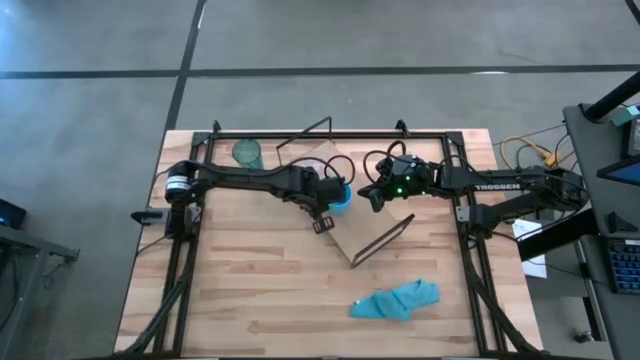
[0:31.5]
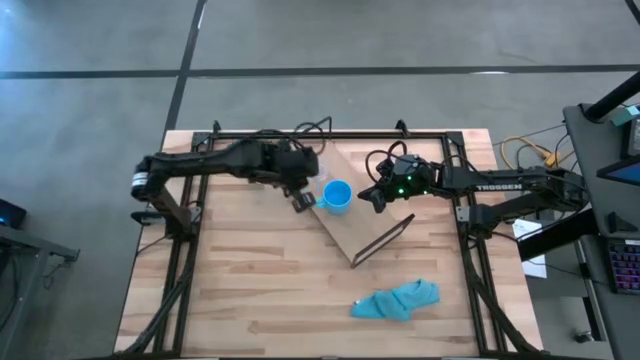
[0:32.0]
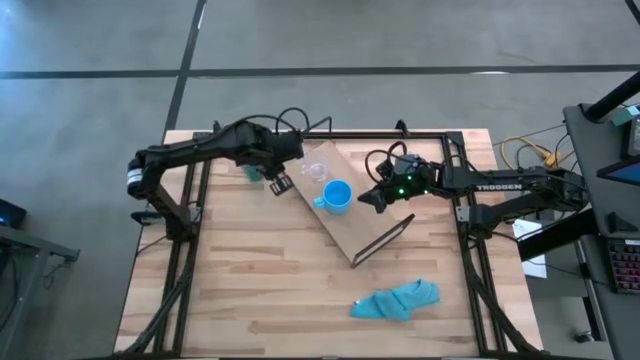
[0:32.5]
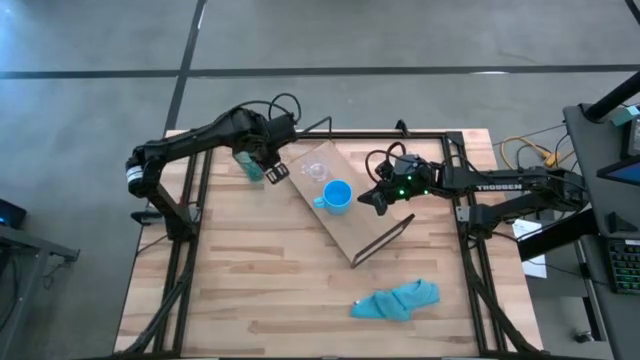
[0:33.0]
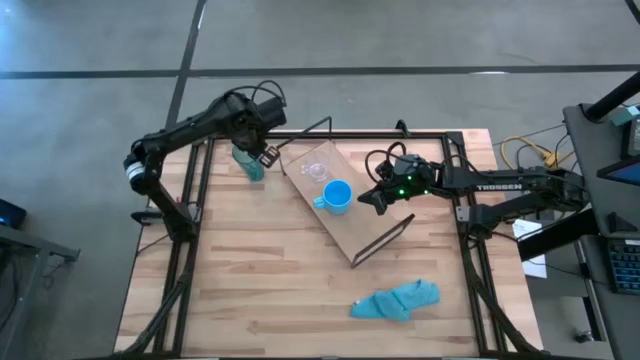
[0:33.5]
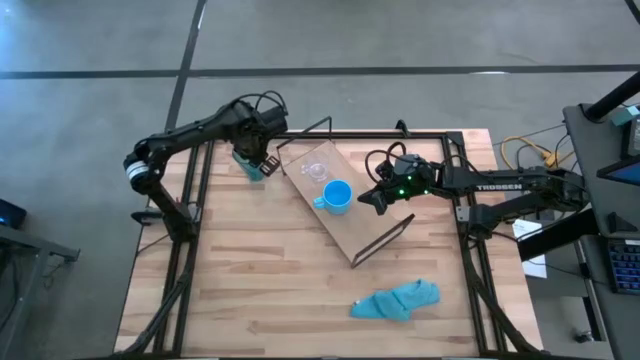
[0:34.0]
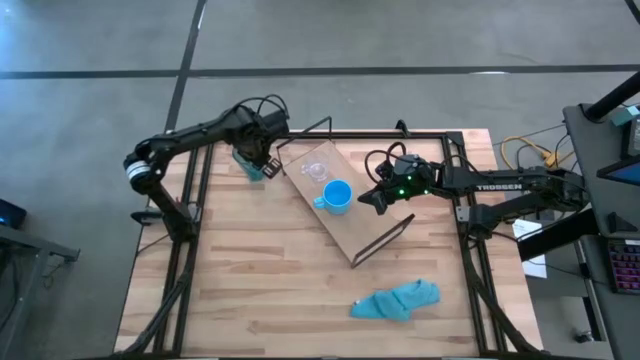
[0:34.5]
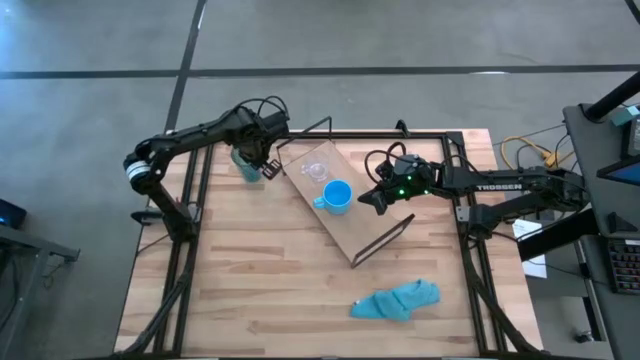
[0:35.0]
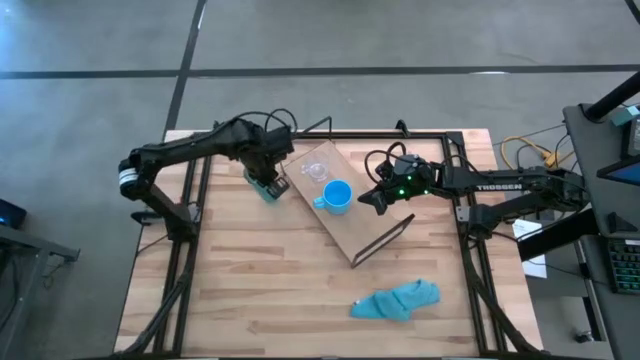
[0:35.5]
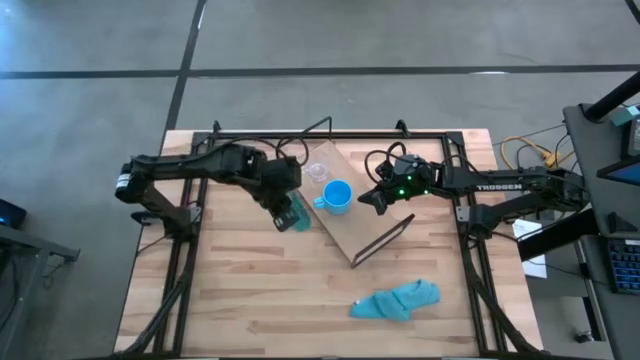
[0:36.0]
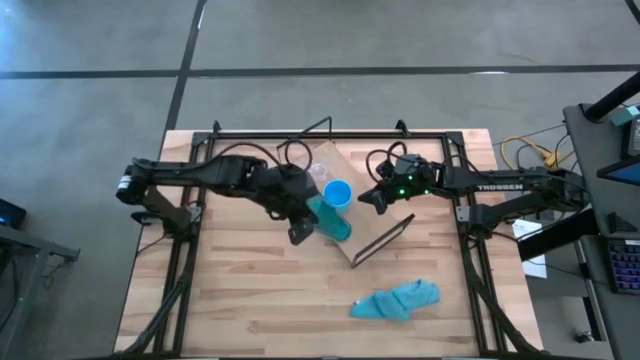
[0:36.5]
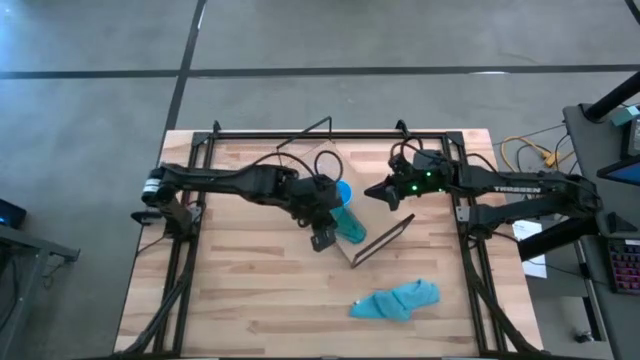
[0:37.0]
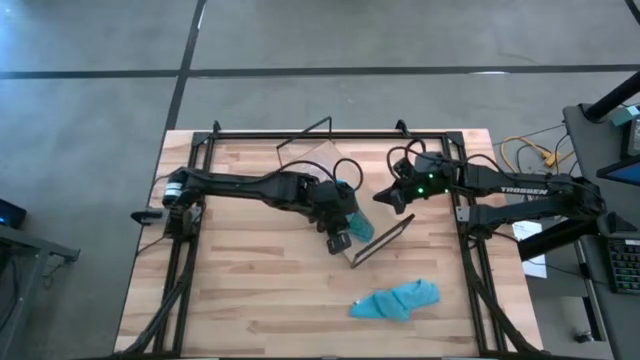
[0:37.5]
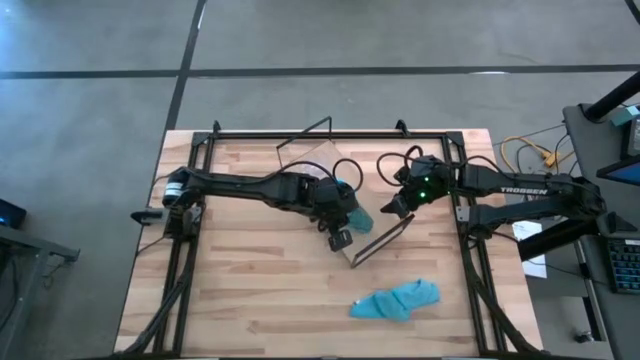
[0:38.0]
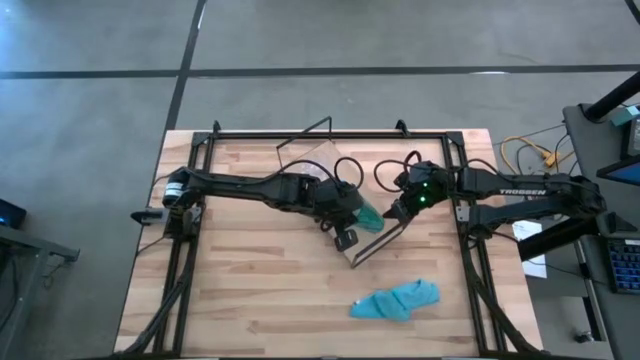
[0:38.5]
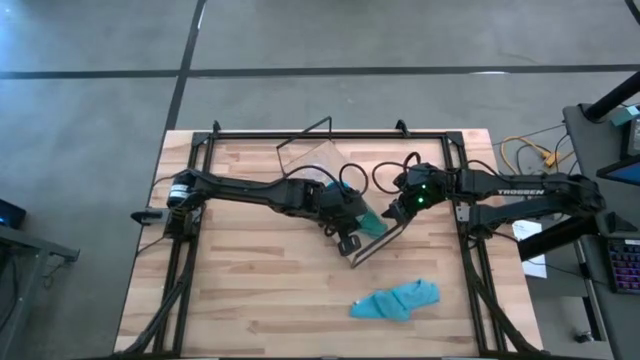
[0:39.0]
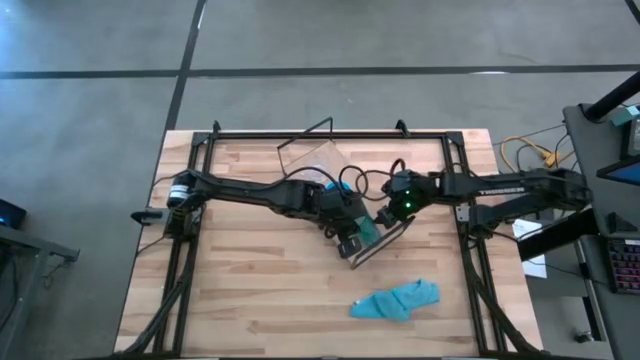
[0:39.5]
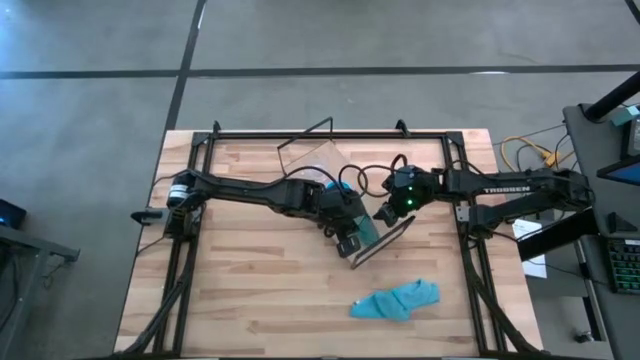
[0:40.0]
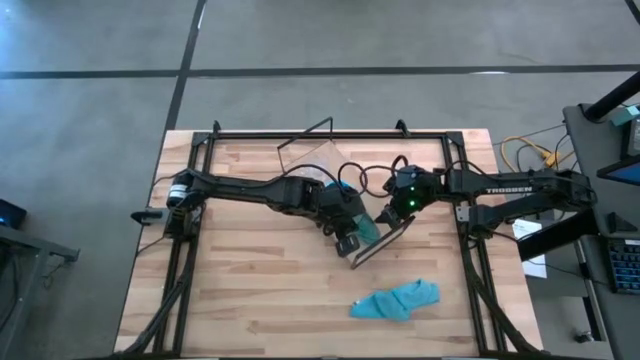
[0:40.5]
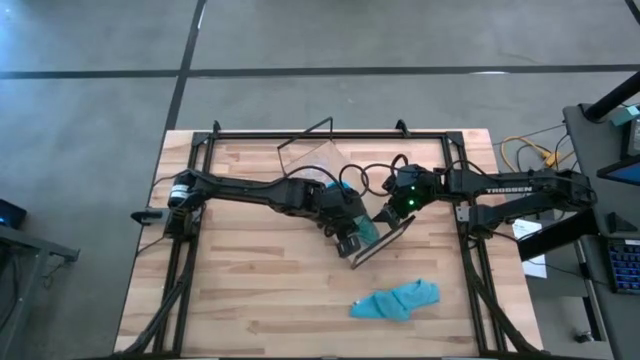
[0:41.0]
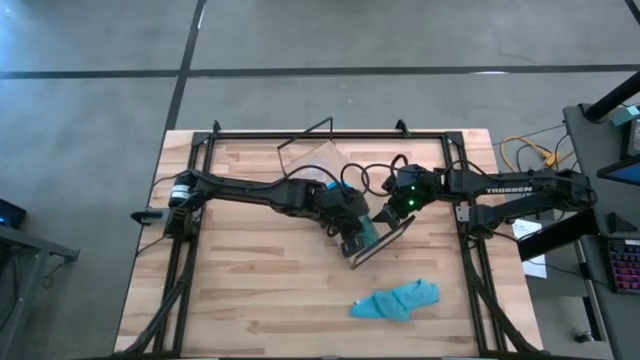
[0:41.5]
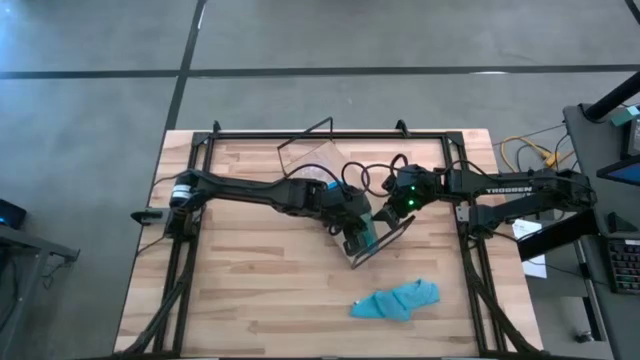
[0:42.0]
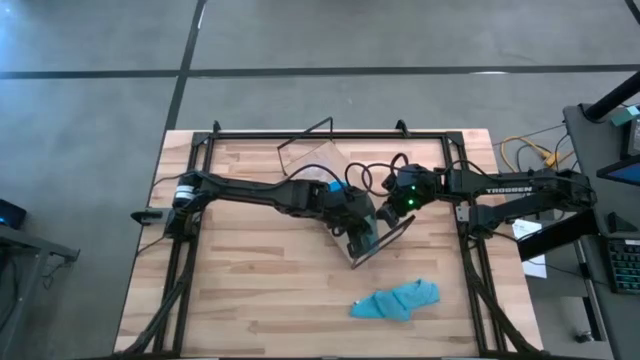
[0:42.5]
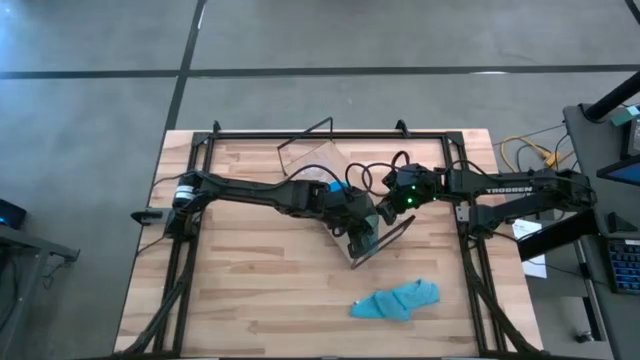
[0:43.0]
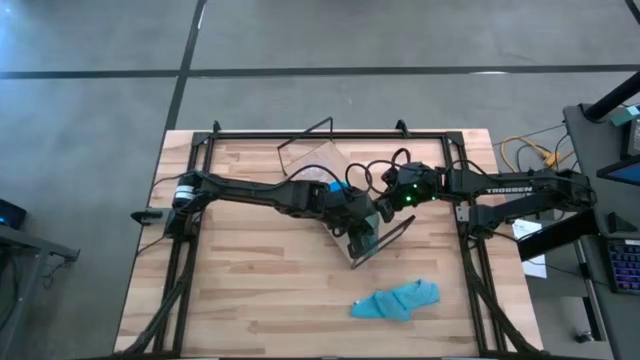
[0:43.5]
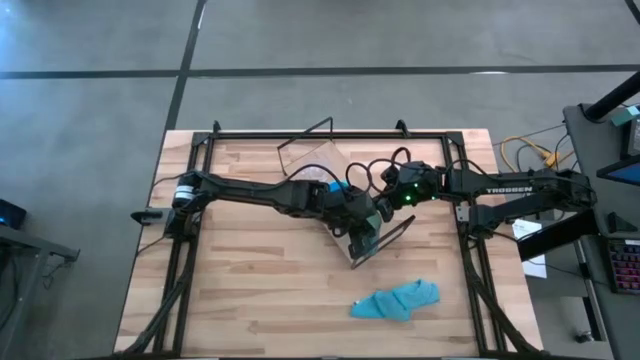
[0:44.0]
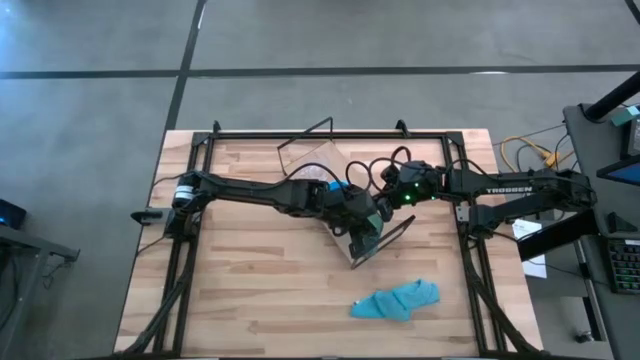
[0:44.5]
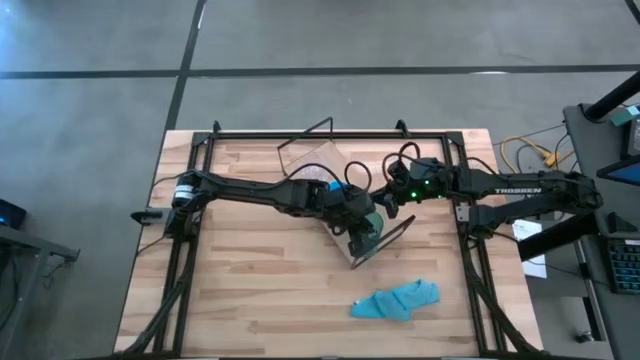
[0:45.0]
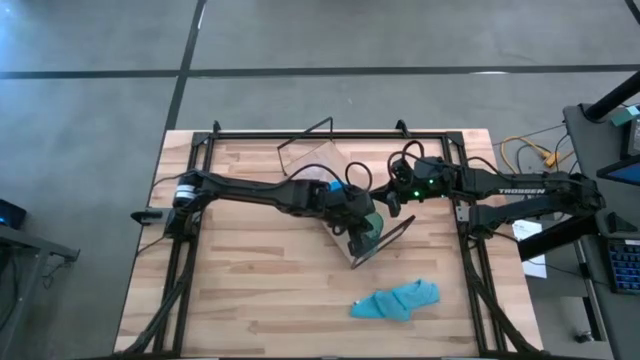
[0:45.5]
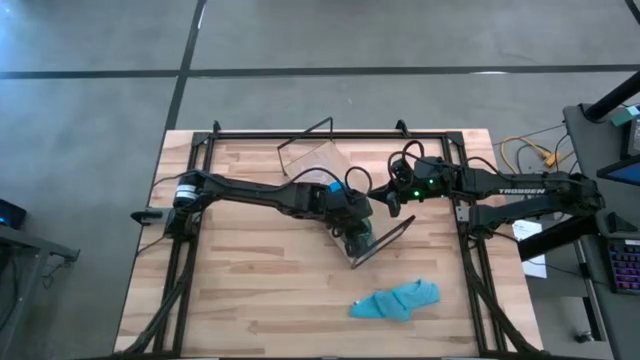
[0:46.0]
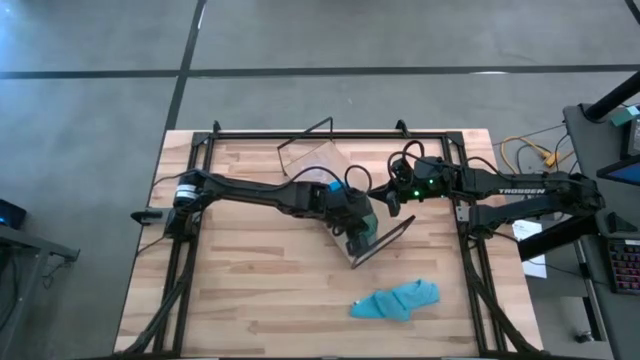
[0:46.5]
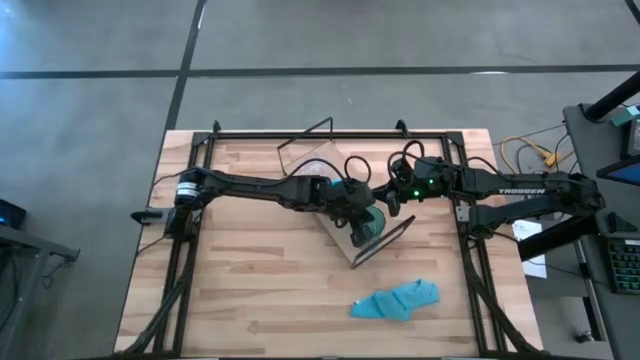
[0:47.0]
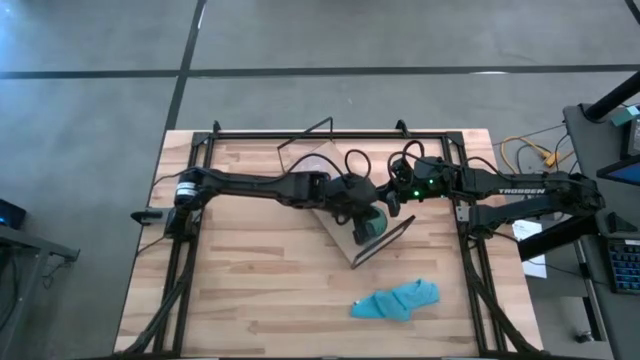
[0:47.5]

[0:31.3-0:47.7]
Task: Stack small to large cups/mugs on shelf
Put the blue cup on the shelf

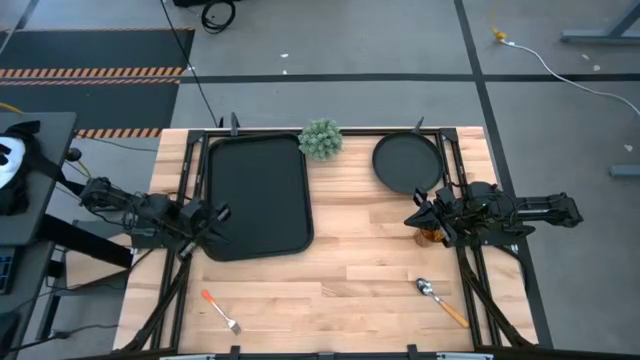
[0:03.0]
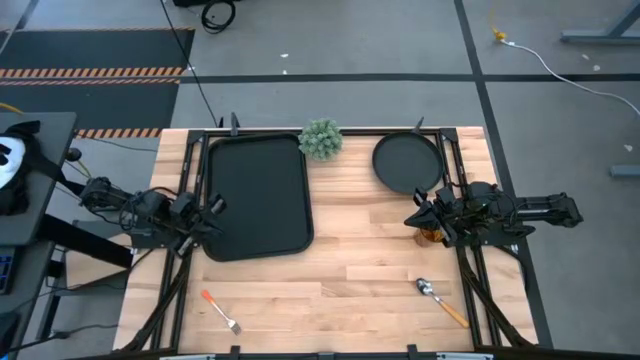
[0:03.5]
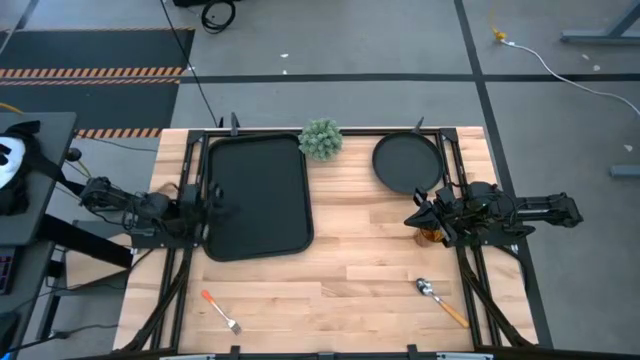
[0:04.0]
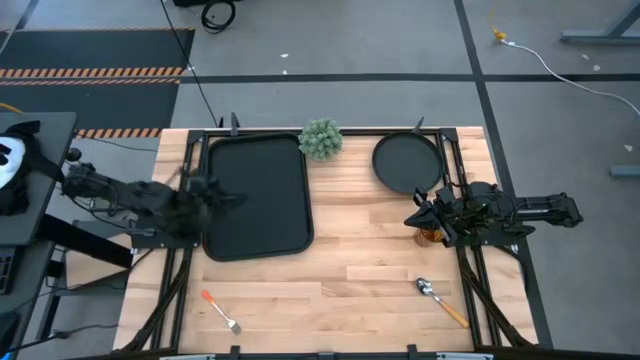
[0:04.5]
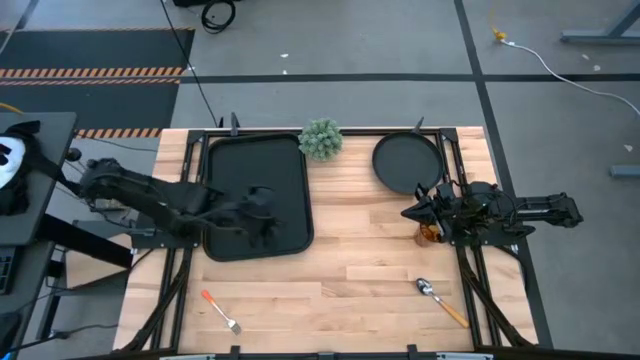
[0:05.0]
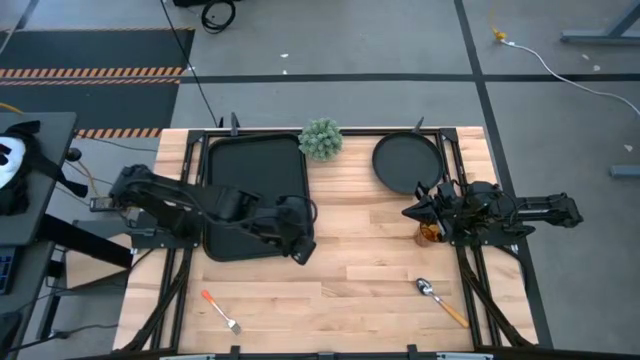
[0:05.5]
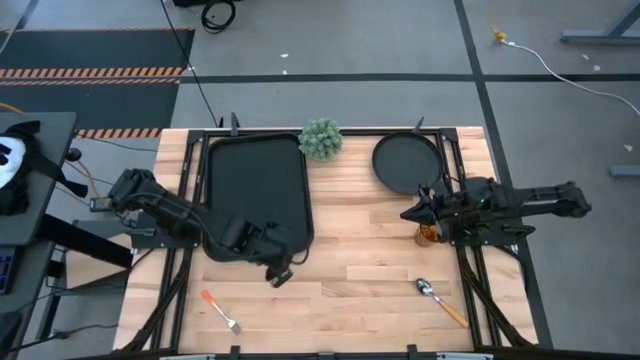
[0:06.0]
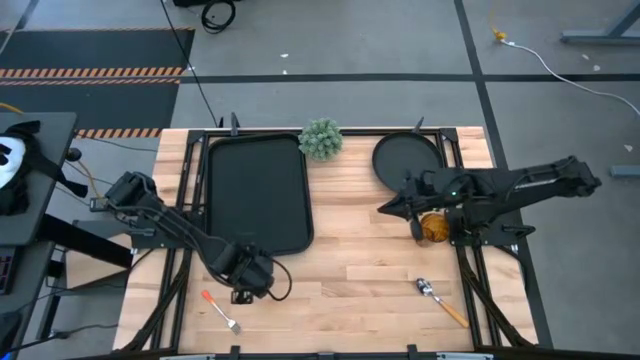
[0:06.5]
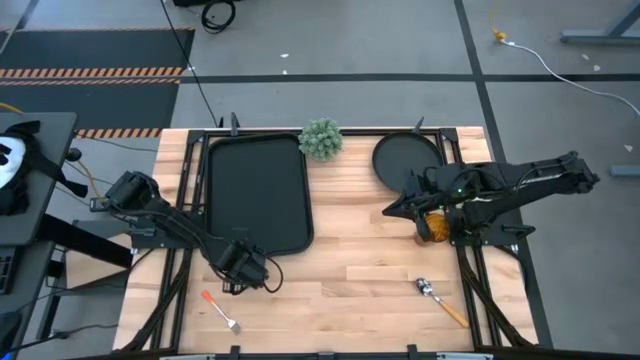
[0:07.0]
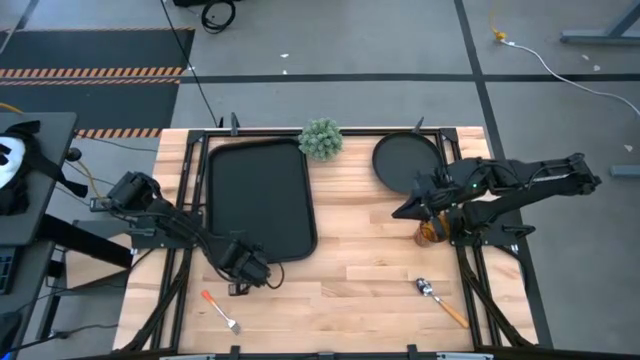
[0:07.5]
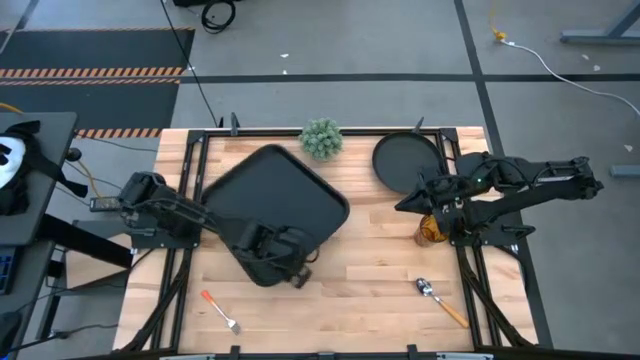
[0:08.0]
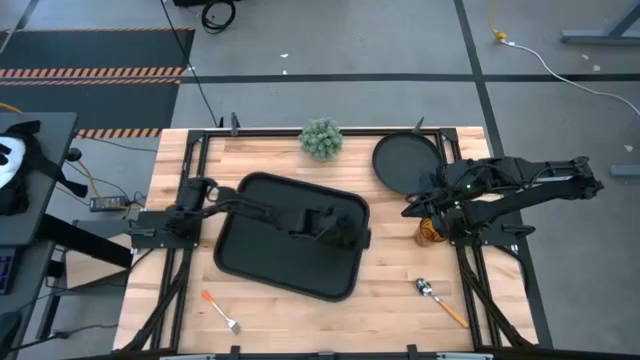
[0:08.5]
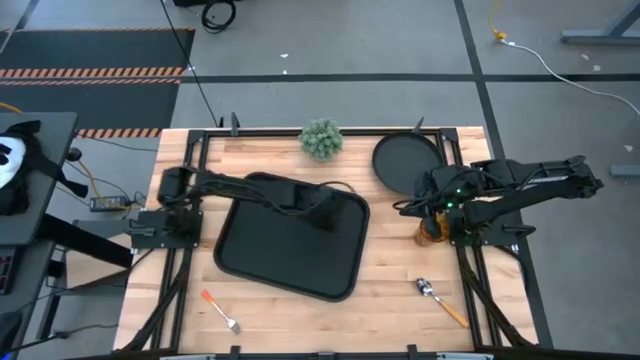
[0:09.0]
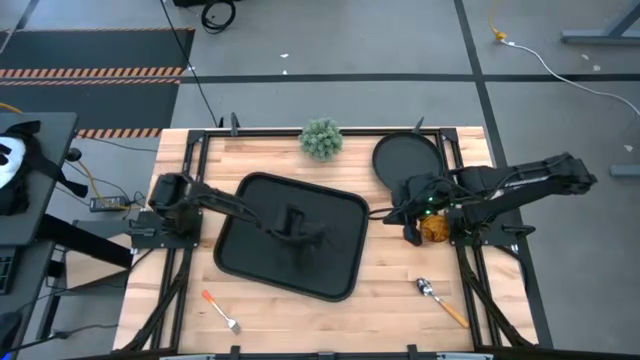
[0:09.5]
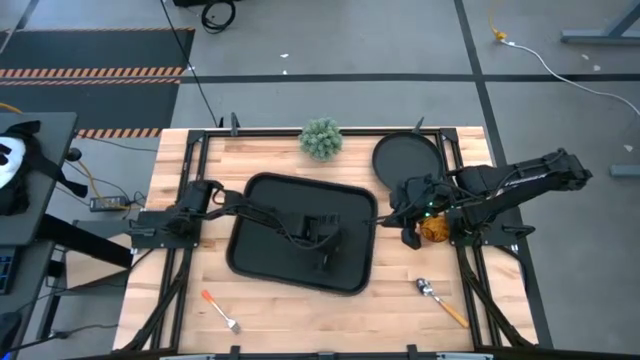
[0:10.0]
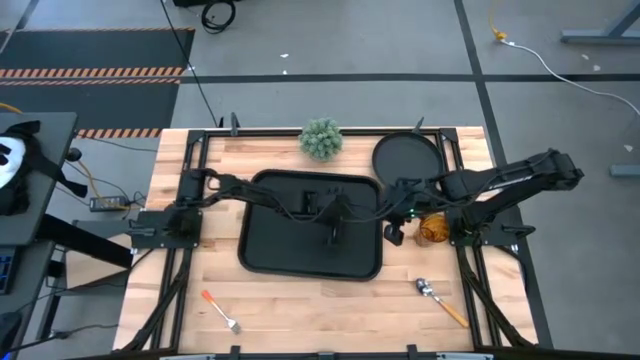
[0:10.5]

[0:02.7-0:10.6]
Task: Pick and place plate/cup/fork/spoon on tray
Prepare the black serving tray
